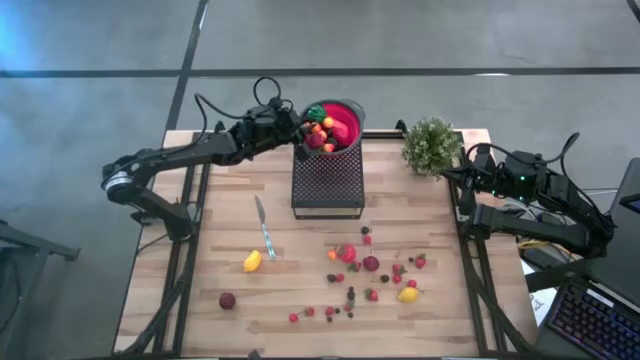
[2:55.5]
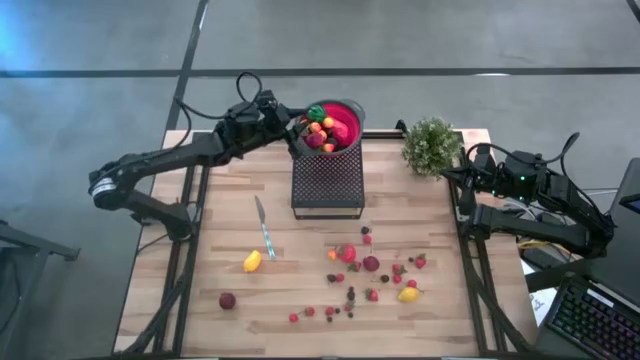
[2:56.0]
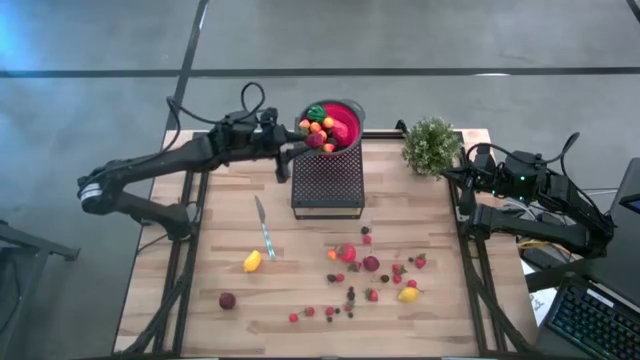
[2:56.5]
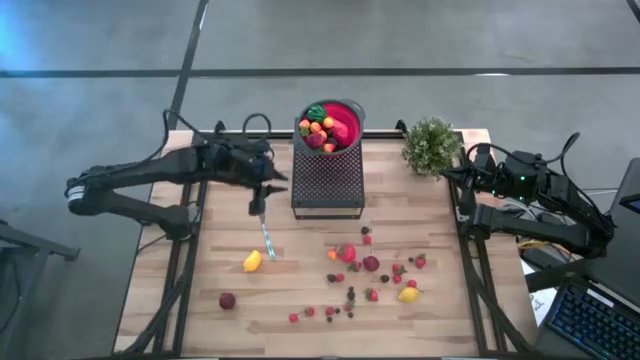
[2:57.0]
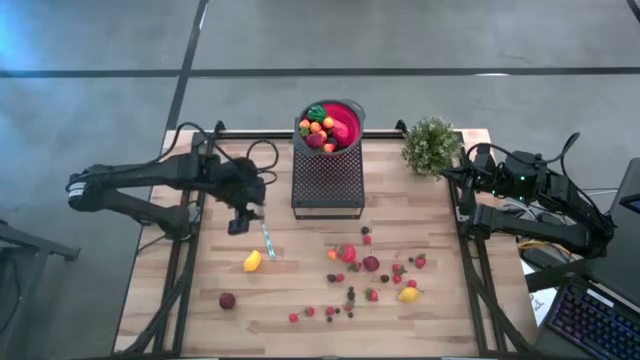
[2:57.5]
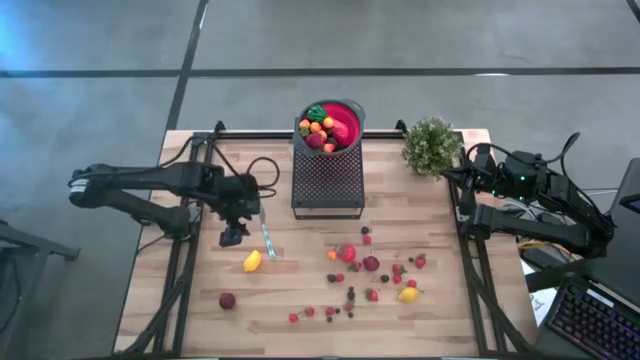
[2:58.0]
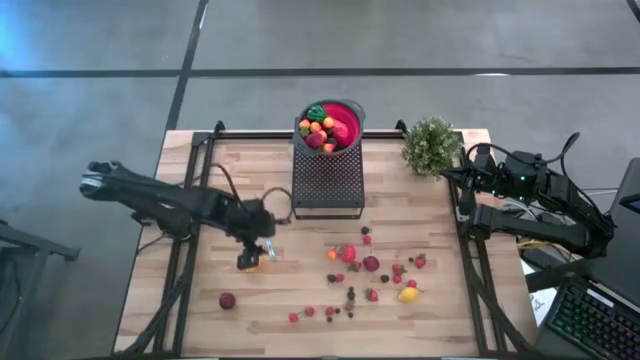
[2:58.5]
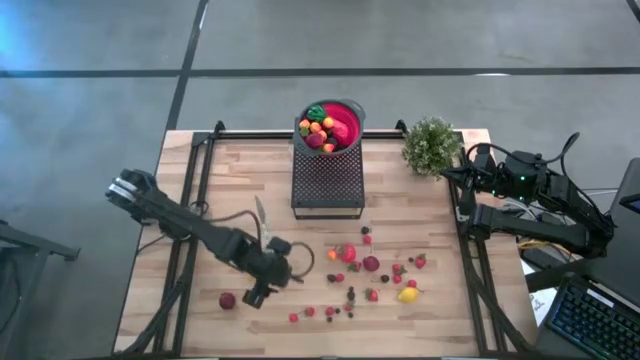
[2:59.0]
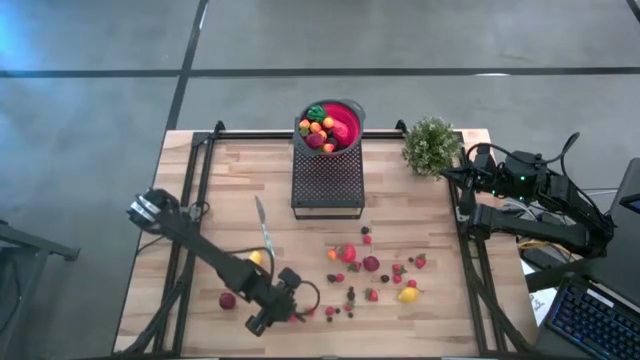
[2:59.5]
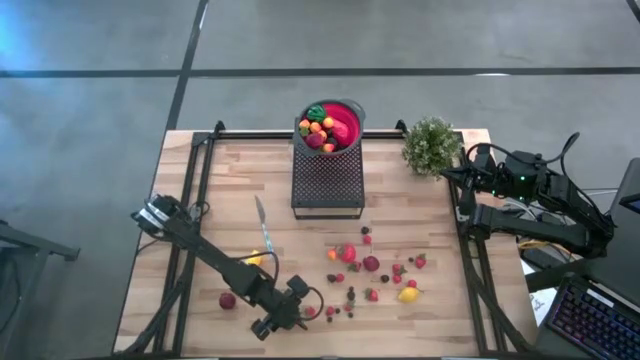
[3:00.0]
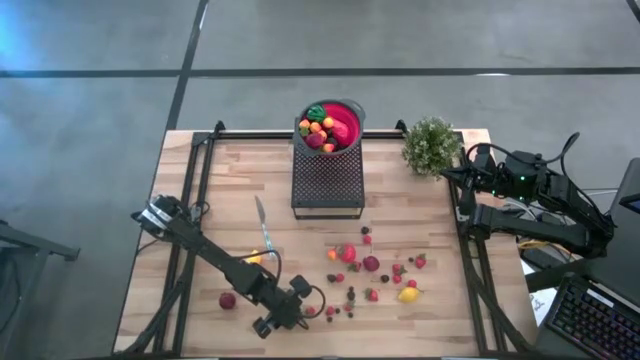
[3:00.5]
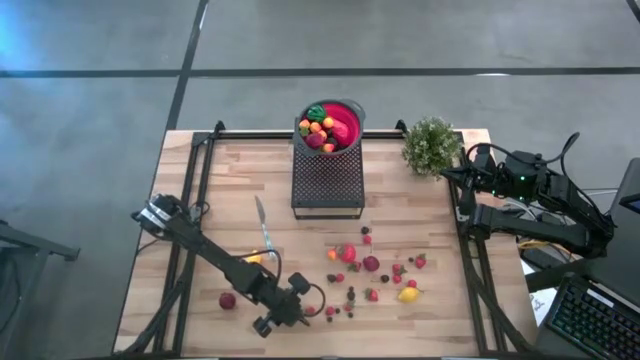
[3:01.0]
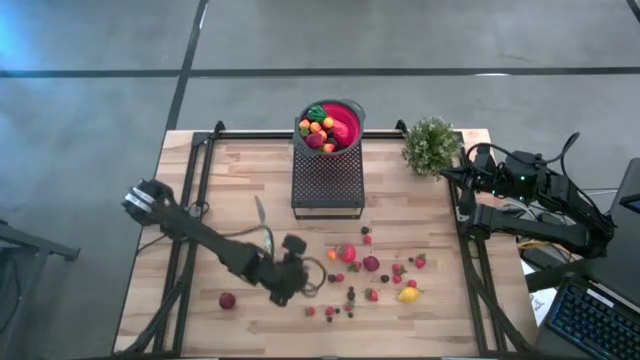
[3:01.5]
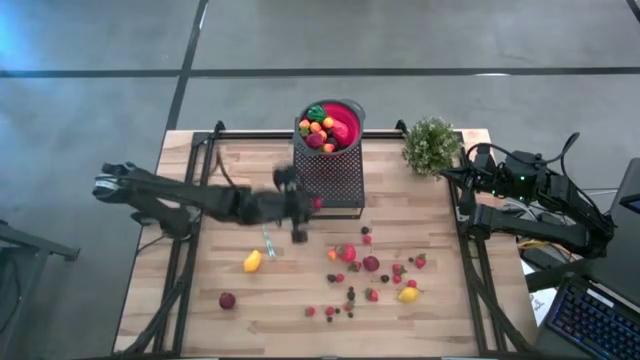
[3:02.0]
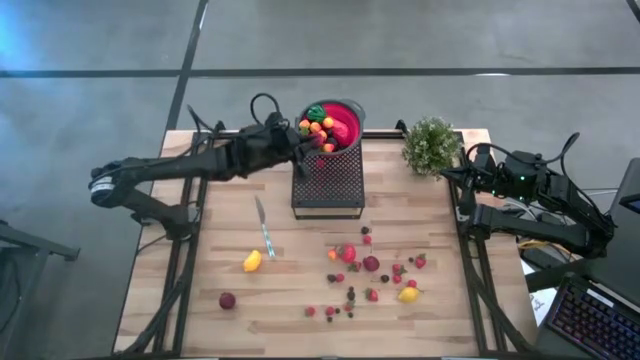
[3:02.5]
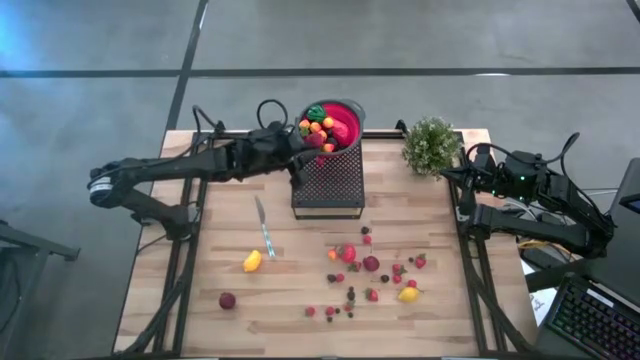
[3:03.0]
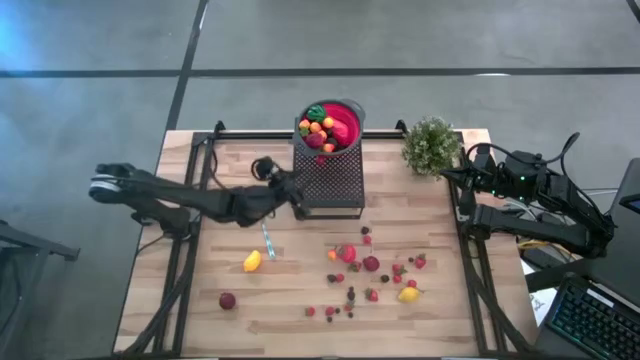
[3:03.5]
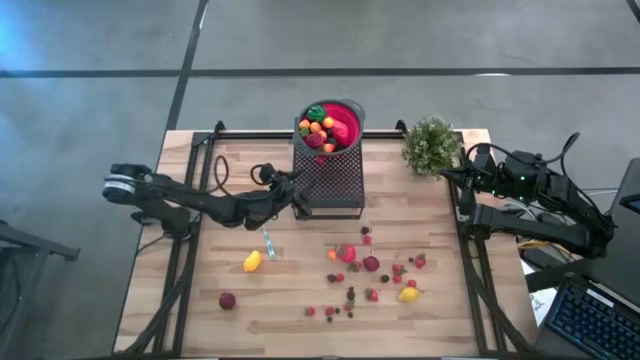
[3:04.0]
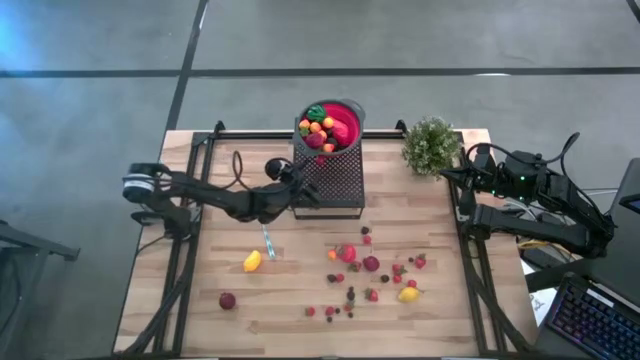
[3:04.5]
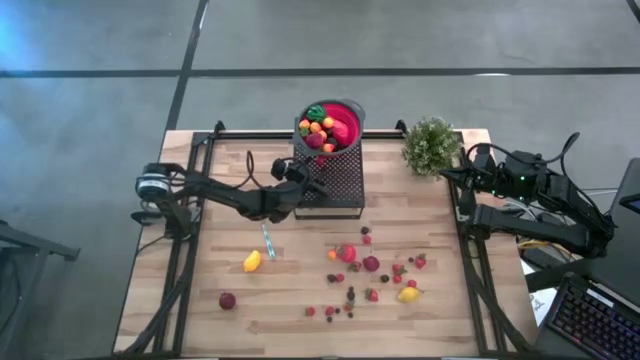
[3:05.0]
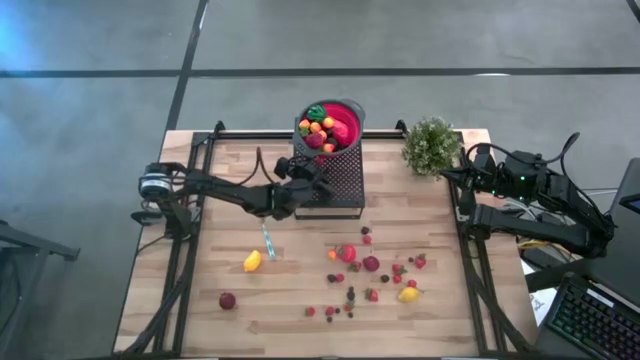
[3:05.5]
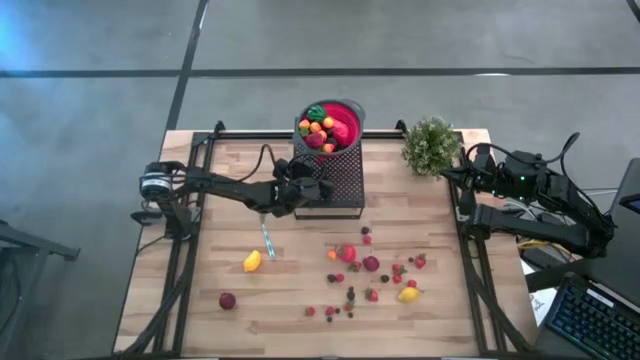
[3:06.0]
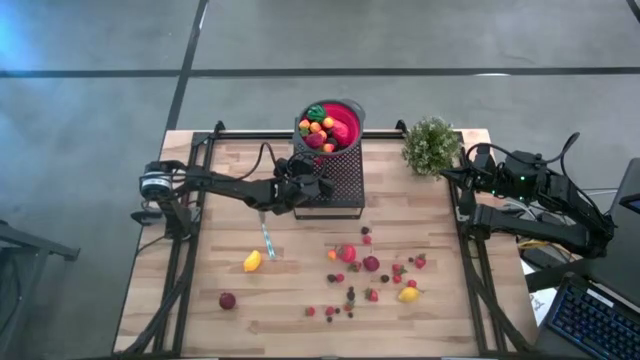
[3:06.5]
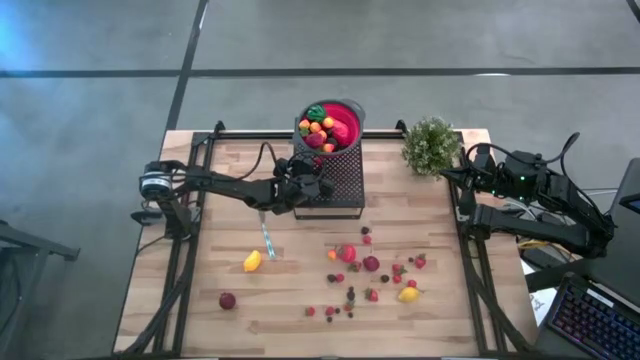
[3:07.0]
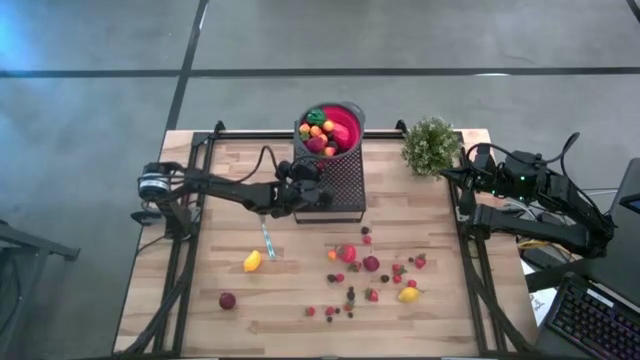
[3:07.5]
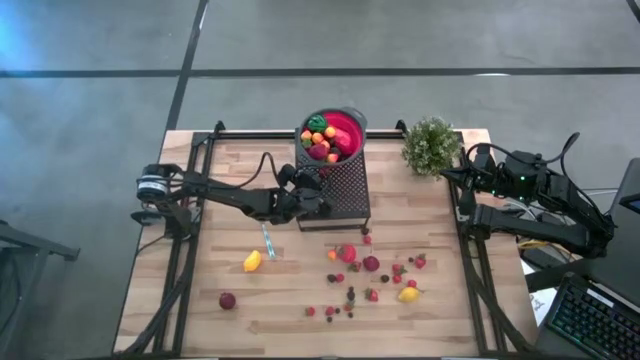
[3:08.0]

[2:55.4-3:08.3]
Task: Pick & Place Fruit
Put the red cherry into the strainer bowl on the shelf

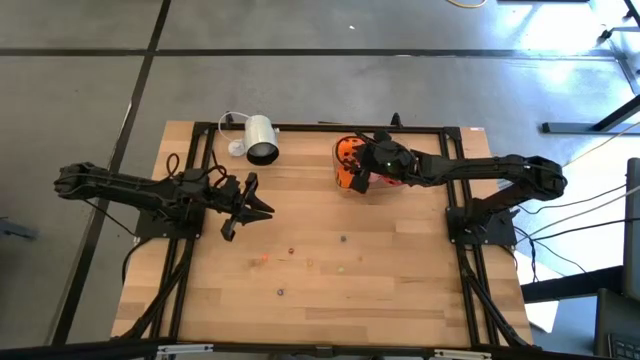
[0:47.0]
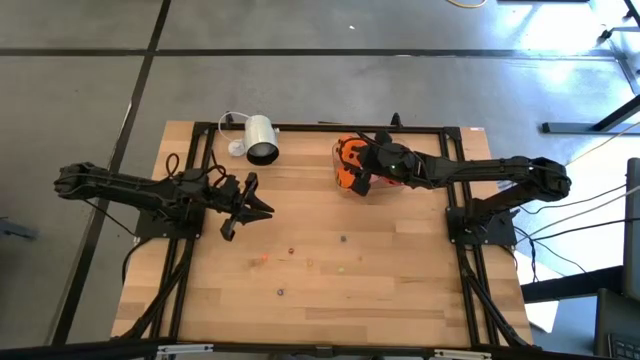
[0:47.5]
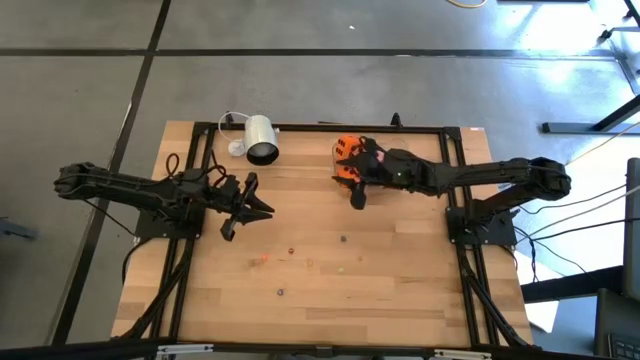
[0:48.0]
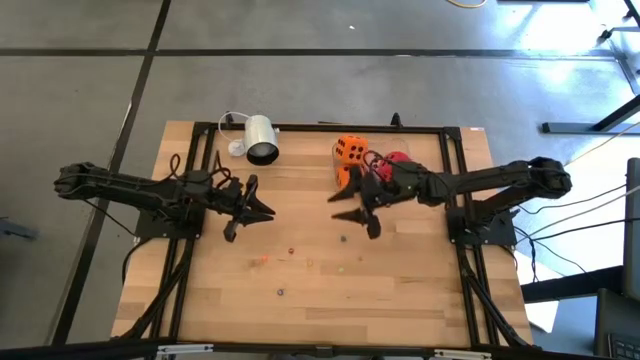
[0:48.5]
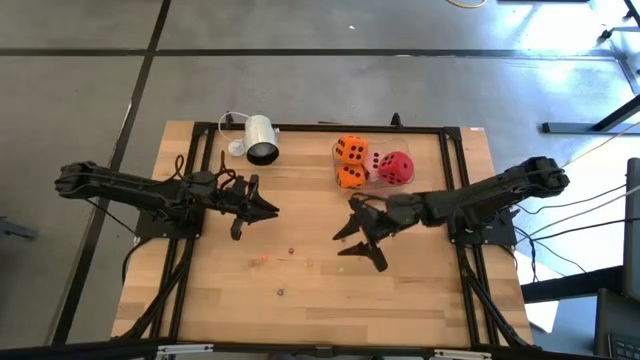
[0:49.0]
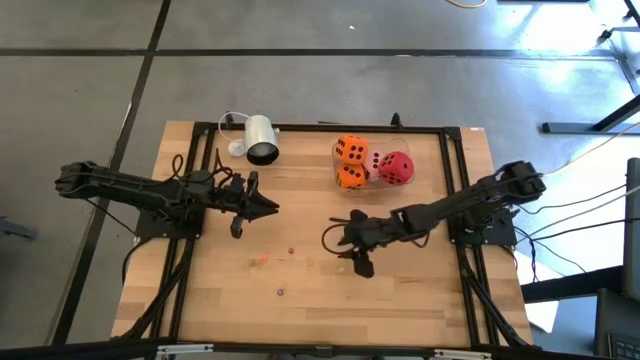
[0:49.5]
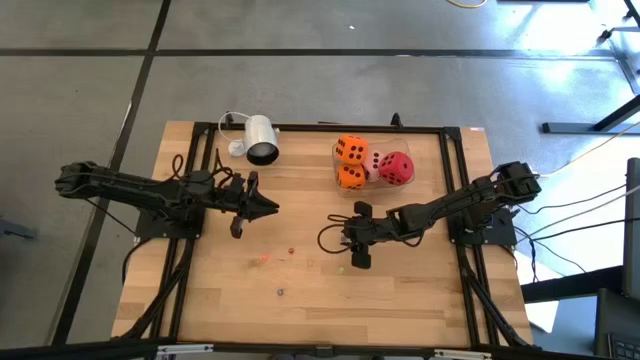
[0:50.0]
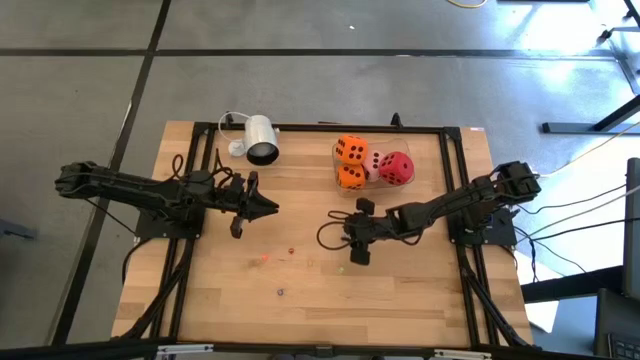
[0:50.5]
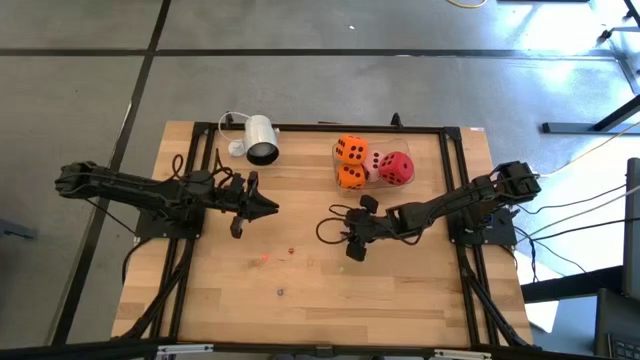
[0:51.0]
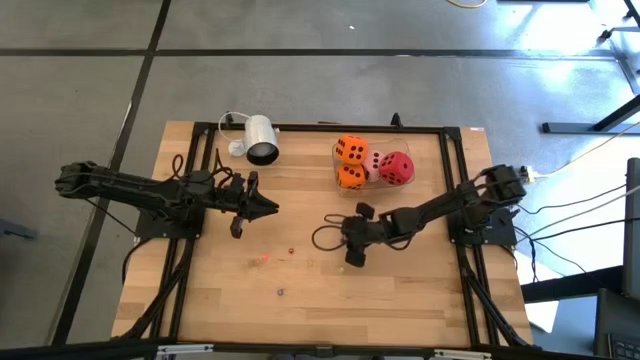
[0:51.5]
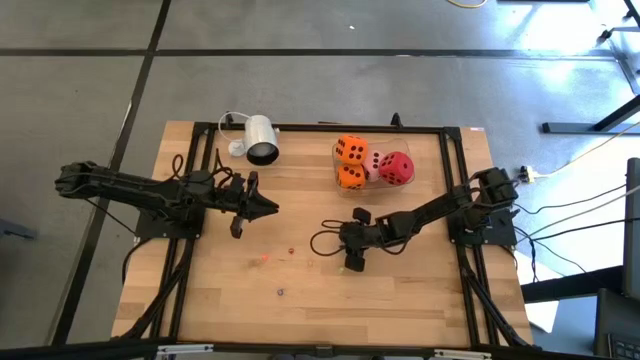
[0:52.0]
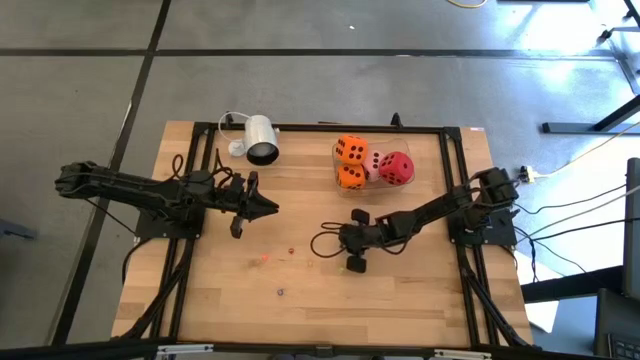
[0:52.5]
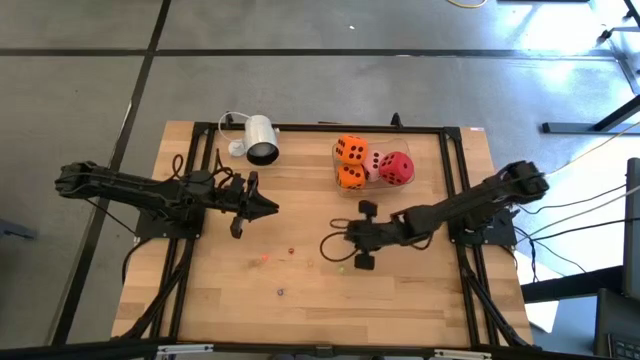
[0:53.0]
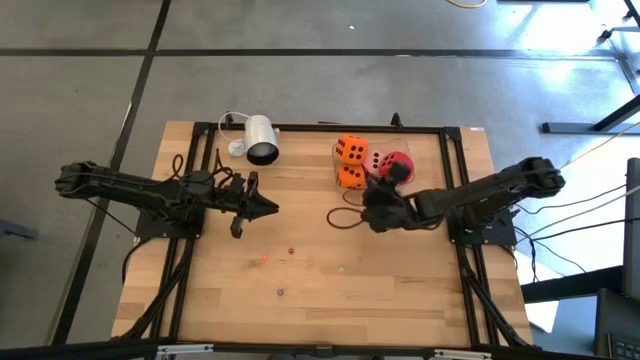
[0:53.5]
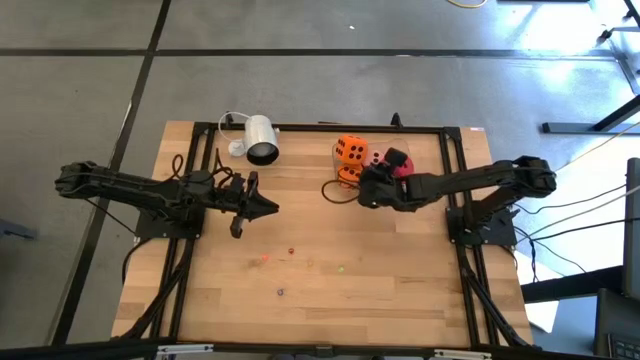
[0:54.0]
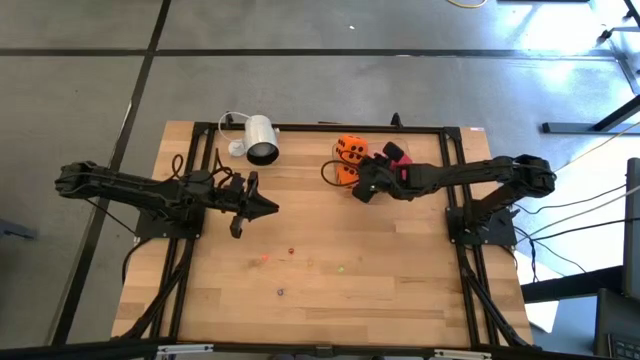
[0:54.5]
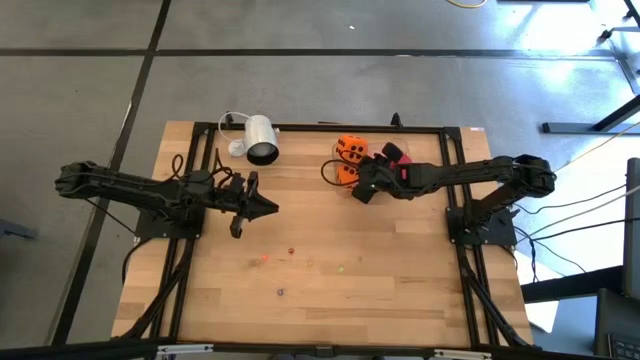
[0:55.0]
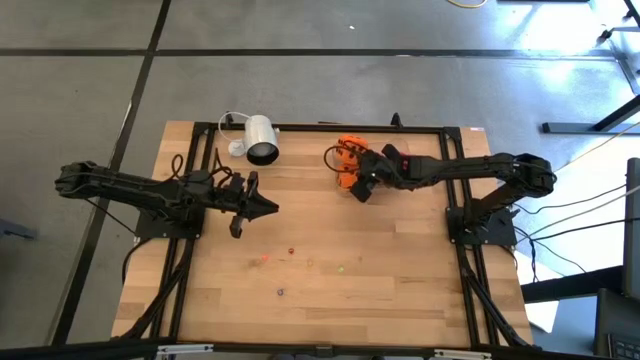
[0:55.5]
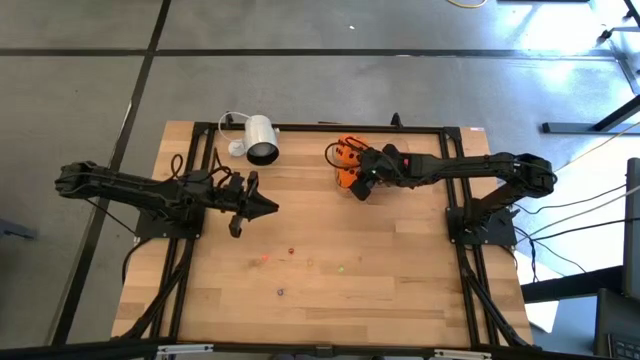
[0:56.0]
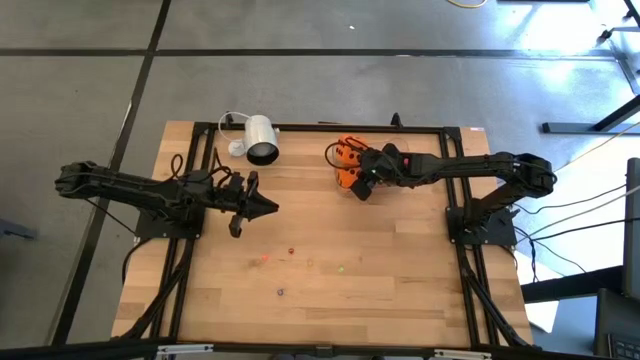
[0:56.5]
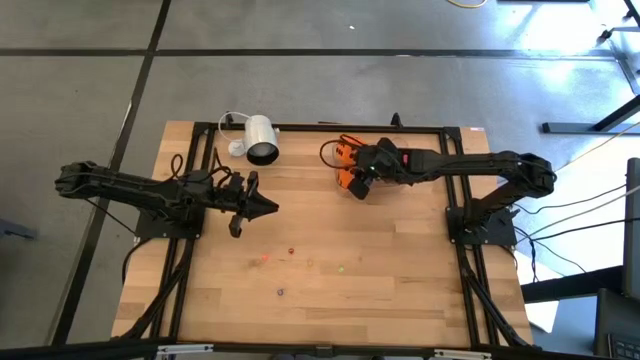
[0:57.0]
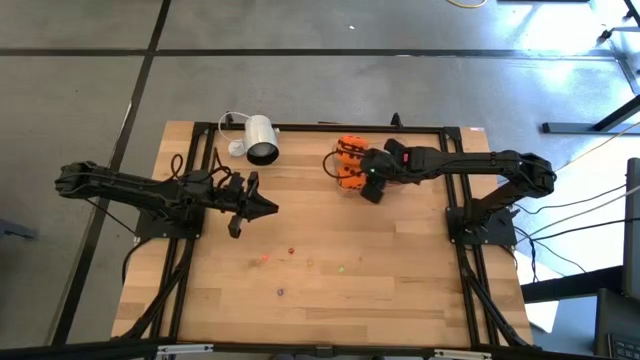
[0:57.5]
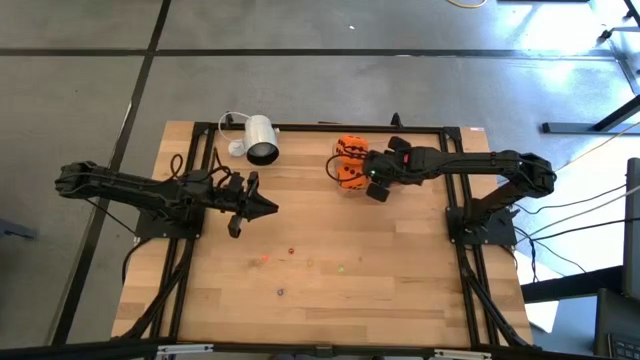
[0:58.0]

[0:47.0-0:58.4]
Task: Pick & Place Dice
Put the top small blue die into the transparent bin
